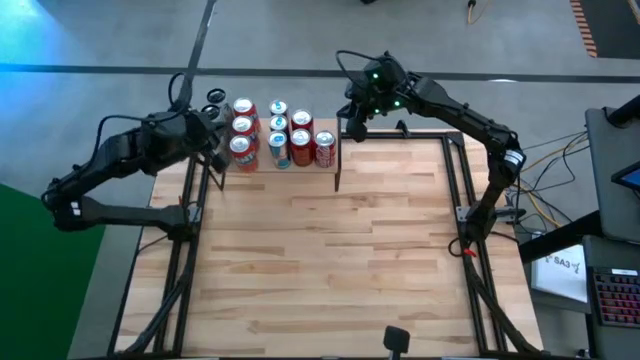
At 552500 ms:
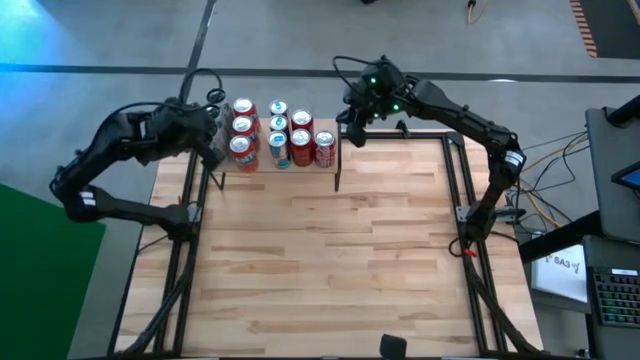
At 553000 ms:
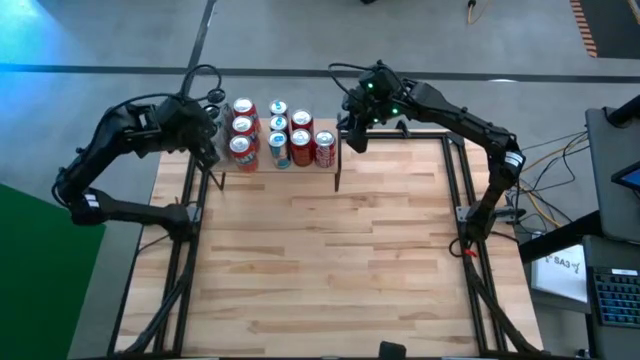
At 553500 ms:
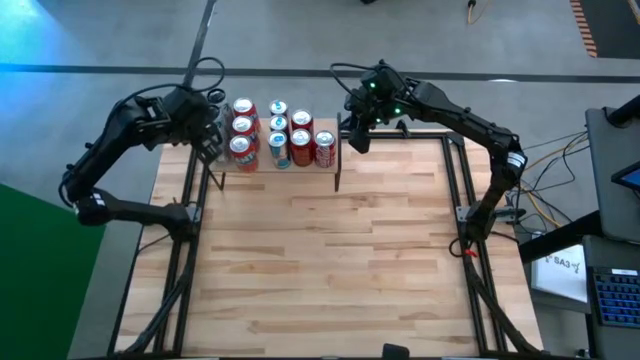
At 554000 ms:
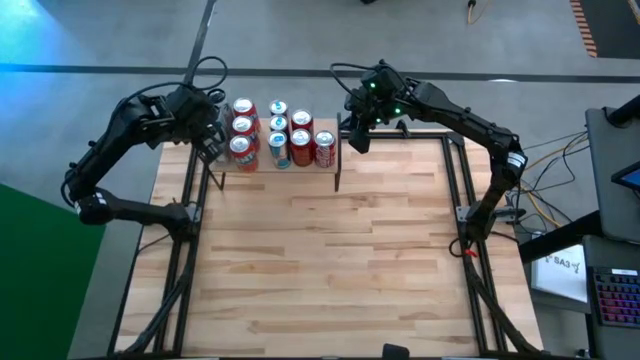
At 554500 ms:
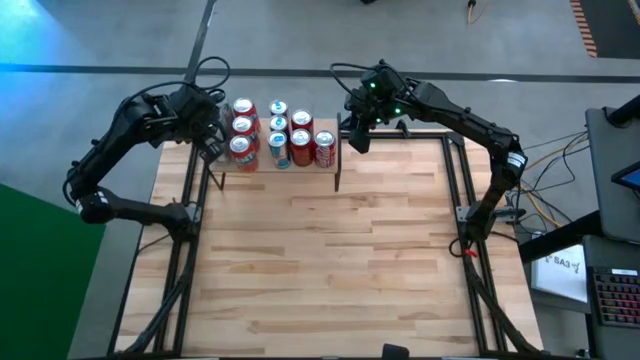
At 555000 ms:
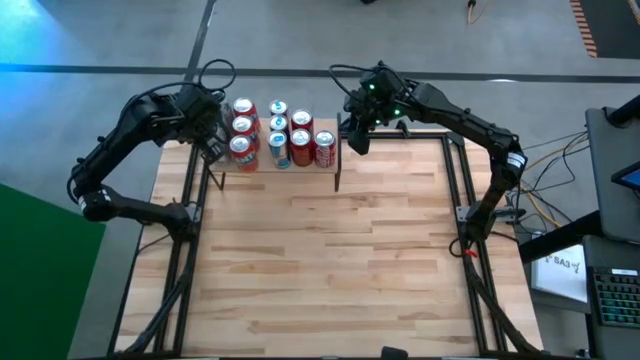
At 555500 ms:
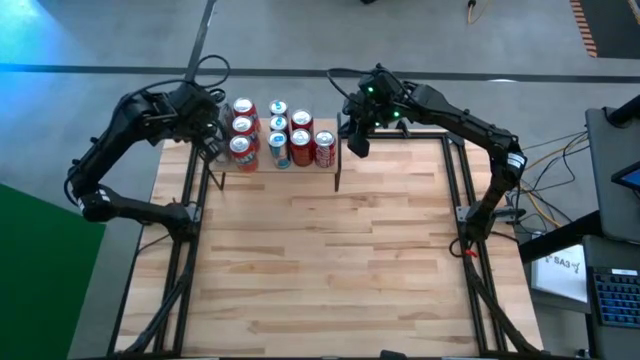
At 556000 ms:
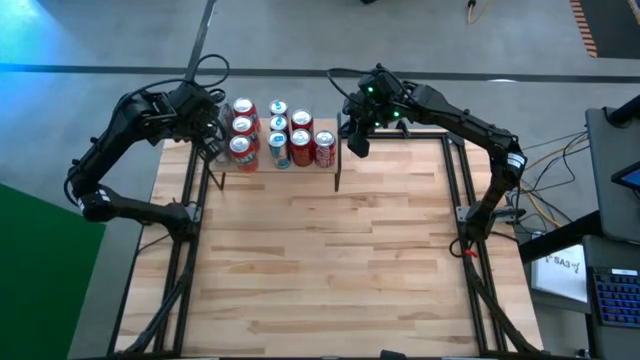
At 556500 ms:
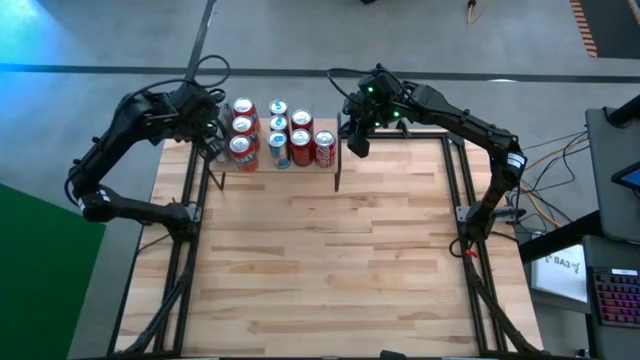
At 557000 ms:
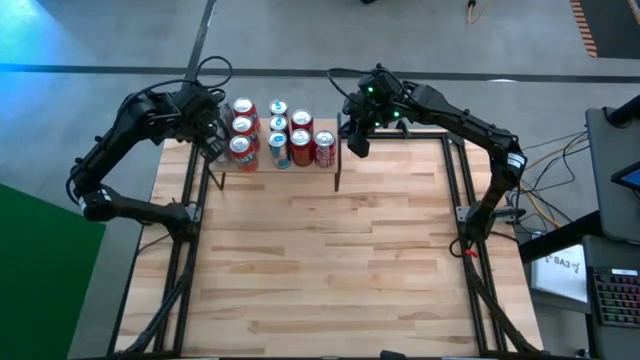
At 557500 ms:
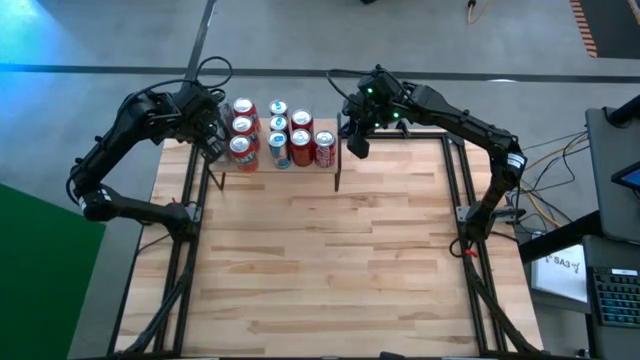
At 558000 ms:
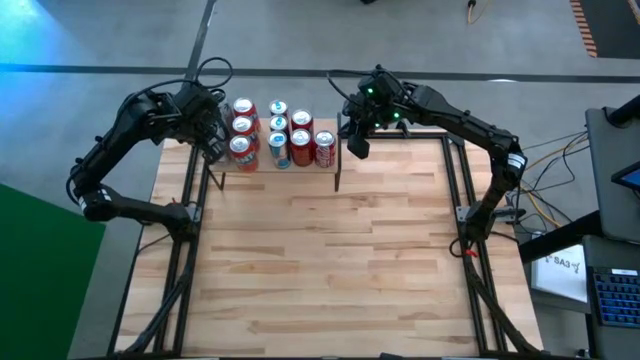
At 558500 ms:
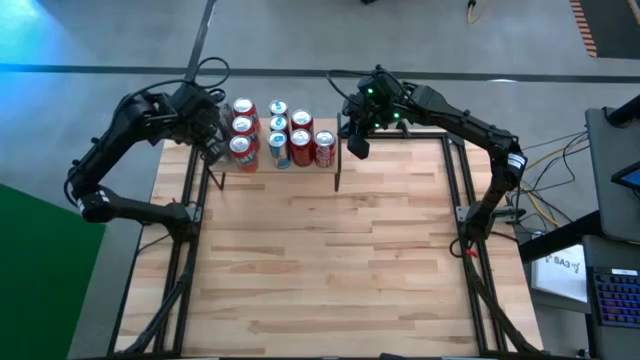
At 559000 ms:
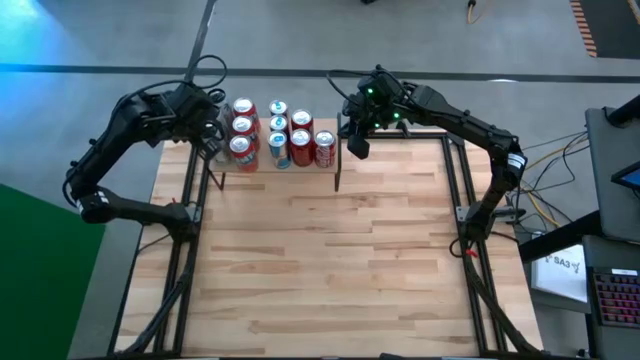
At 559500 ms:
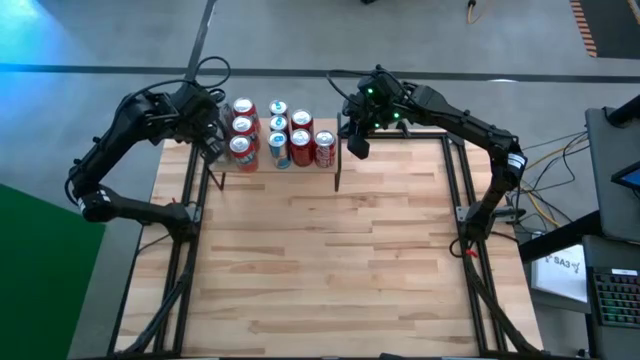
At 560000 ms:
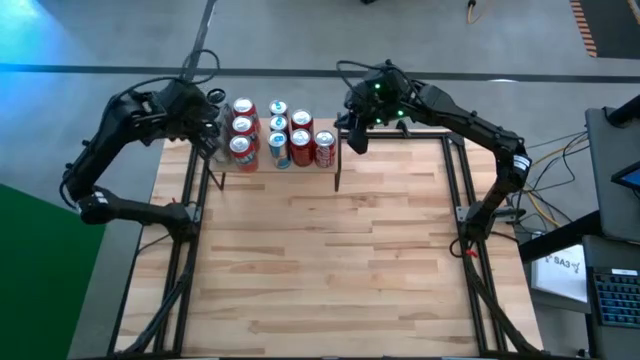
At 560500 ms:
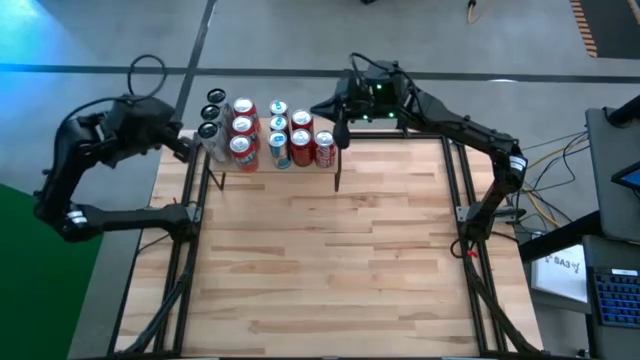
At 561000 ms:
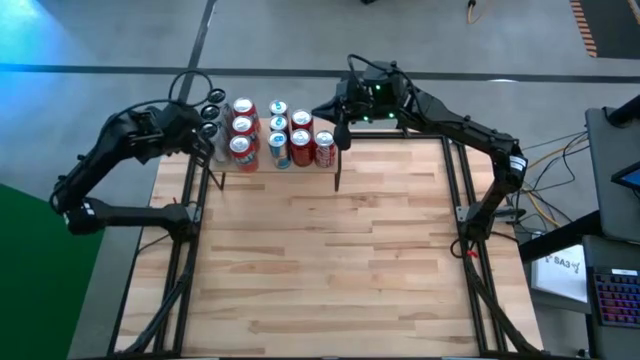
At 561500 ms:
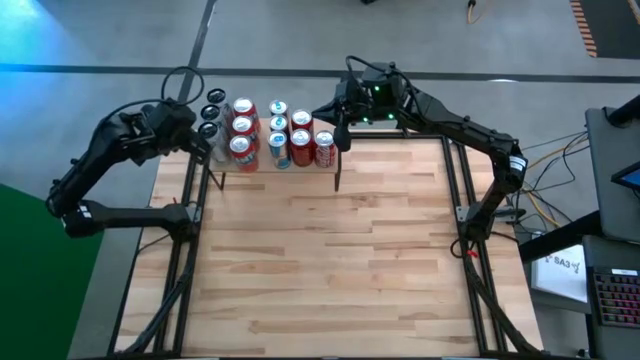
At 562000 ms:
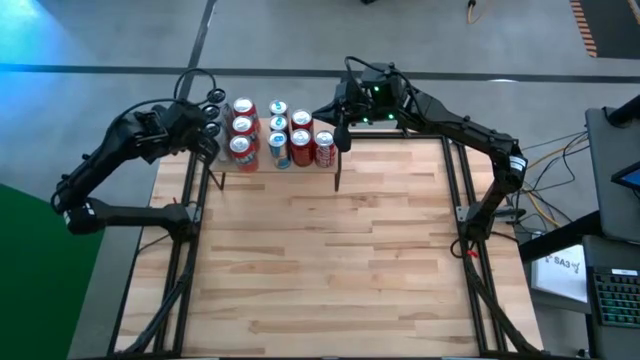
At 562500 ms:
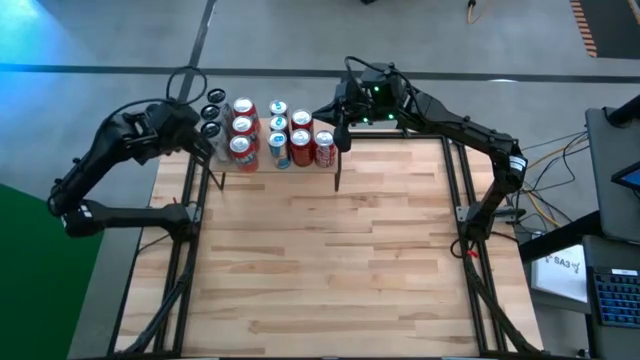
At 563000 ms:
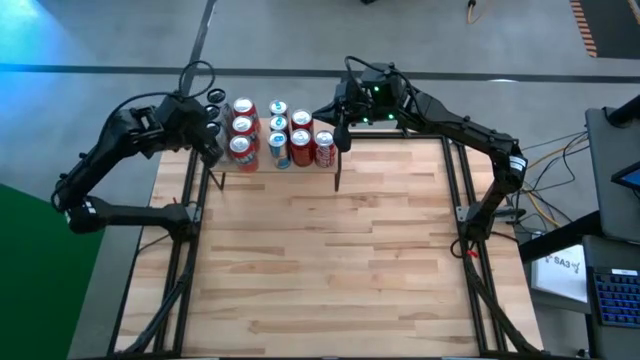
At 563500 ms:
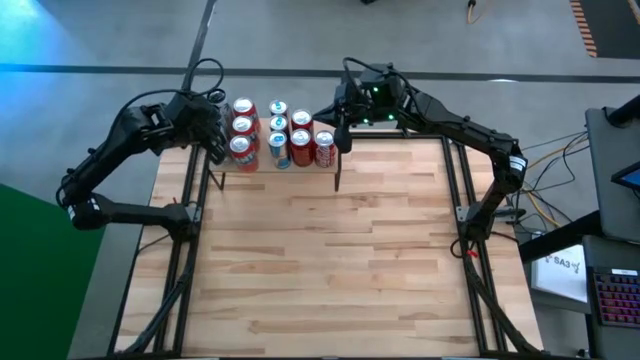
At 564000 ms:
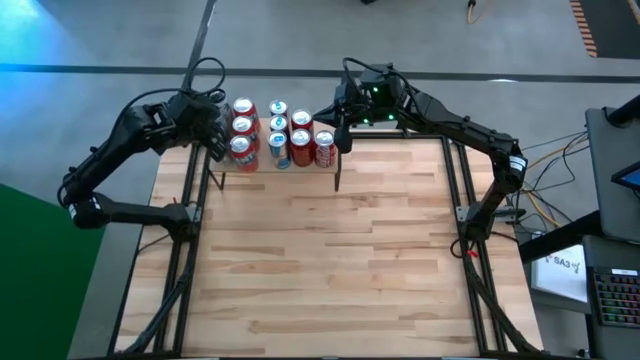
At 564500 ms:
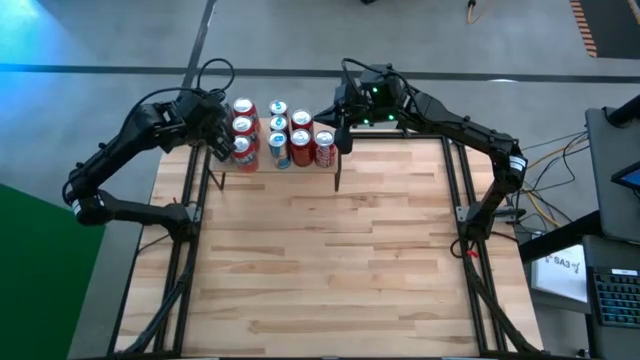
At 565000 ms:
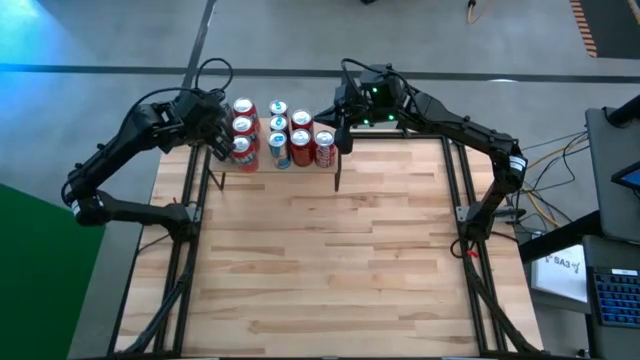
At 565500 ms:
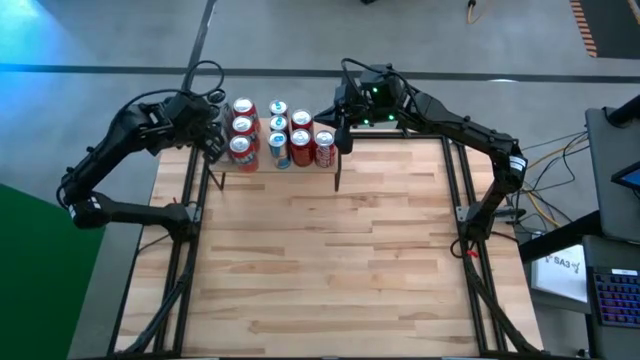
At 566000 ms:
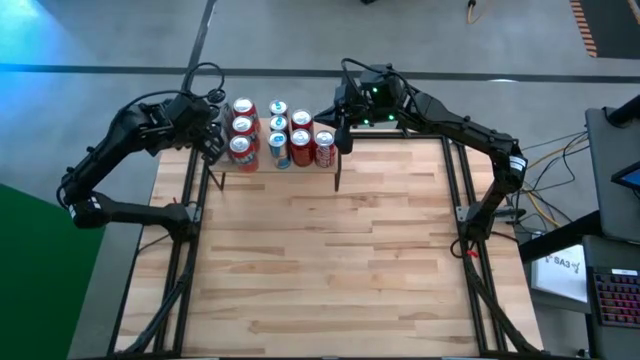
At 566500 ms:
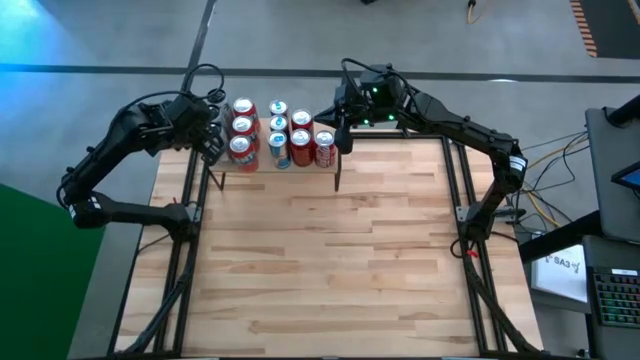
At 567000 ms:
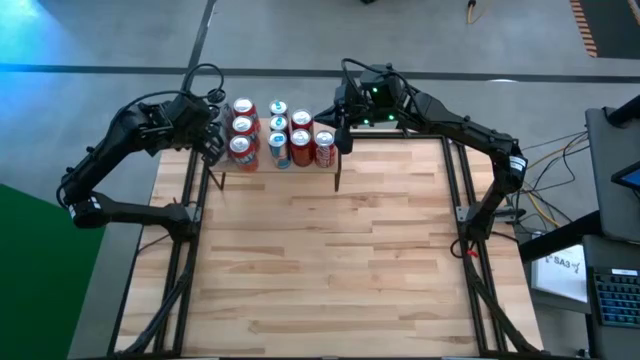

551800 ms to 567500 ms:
Task: Place canned beverage on shelf
Adjust the white pink soda can on the shelf

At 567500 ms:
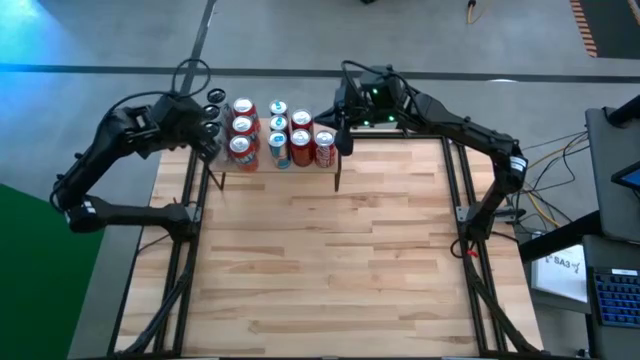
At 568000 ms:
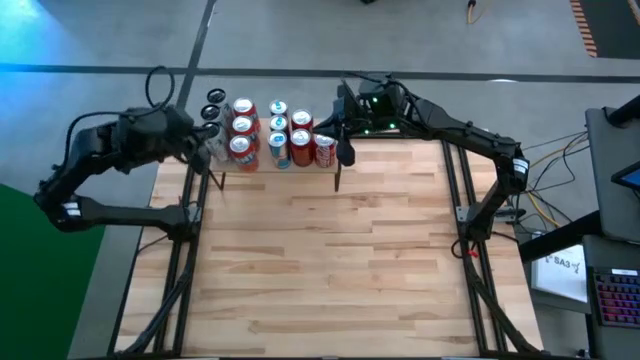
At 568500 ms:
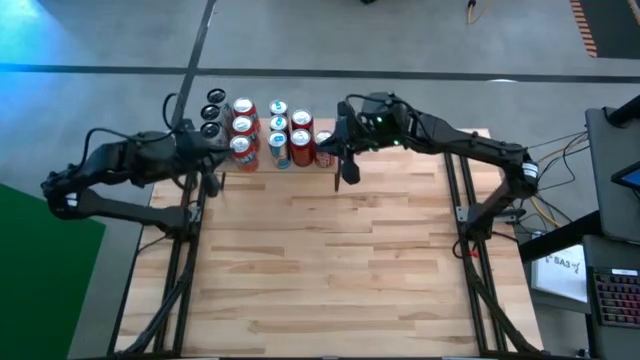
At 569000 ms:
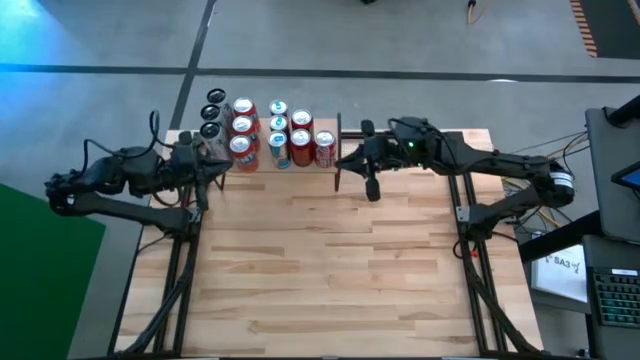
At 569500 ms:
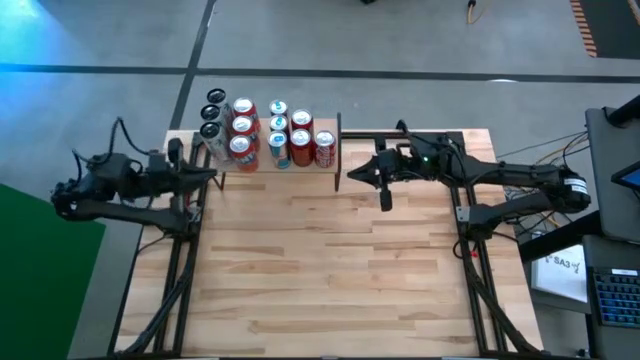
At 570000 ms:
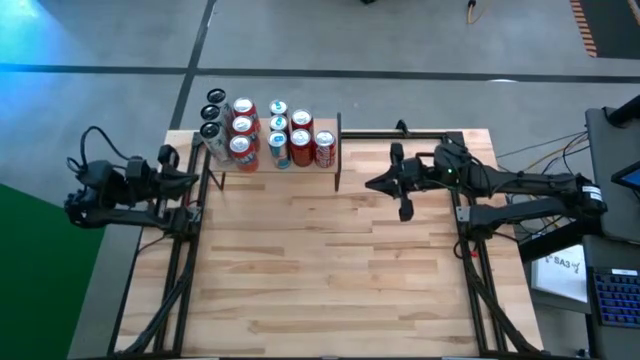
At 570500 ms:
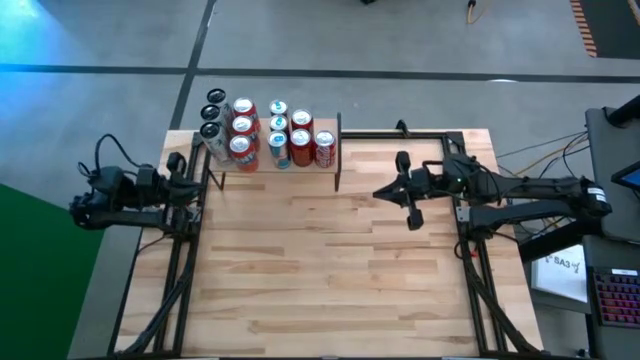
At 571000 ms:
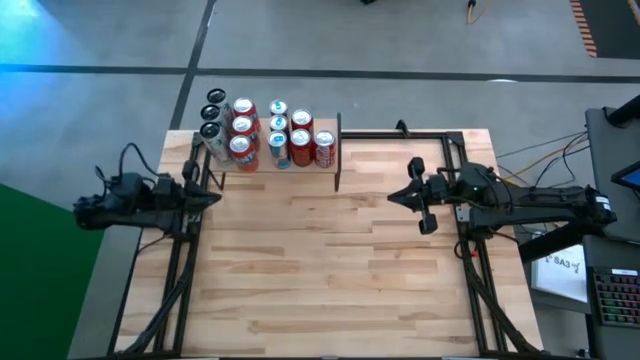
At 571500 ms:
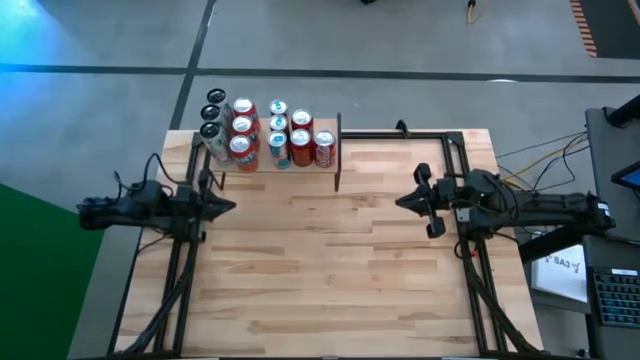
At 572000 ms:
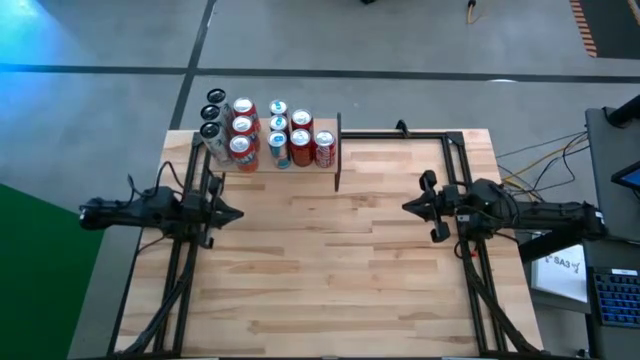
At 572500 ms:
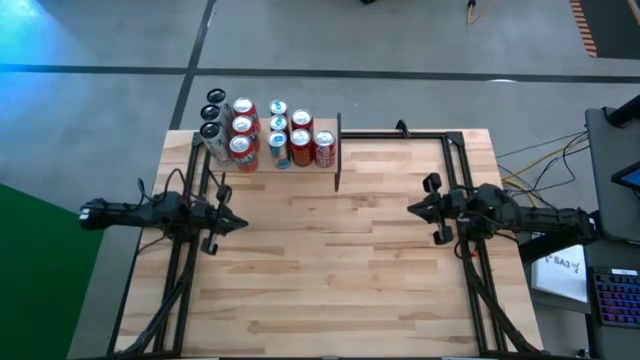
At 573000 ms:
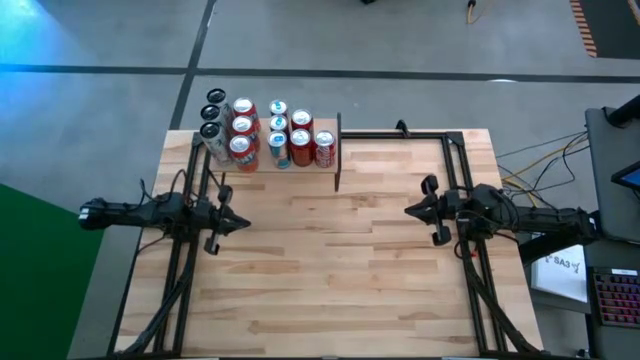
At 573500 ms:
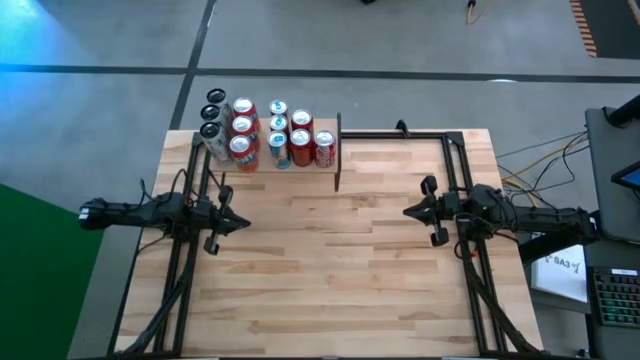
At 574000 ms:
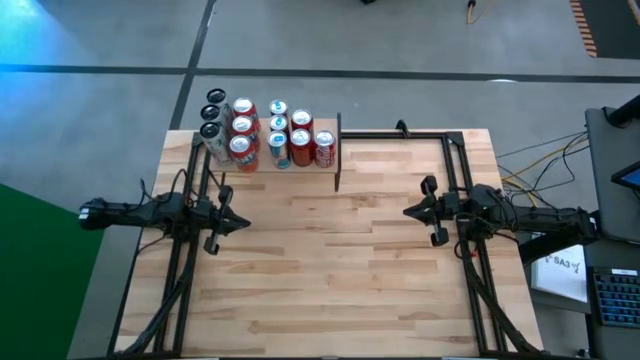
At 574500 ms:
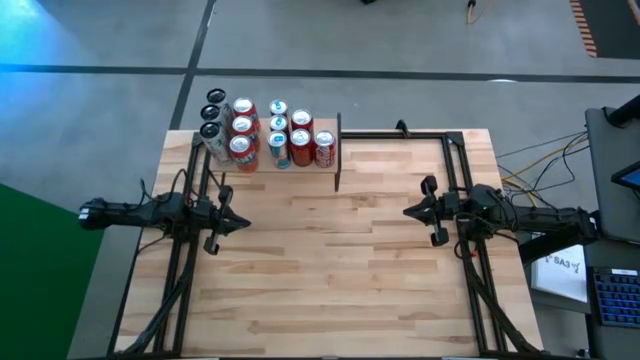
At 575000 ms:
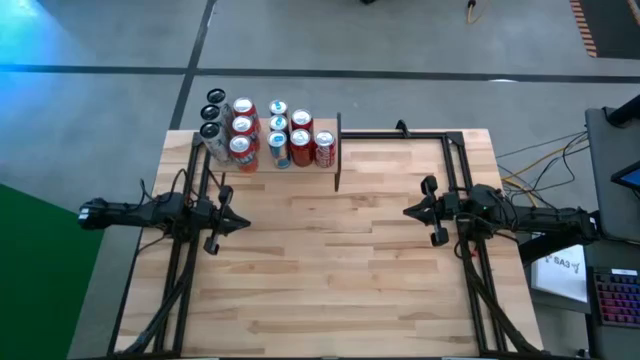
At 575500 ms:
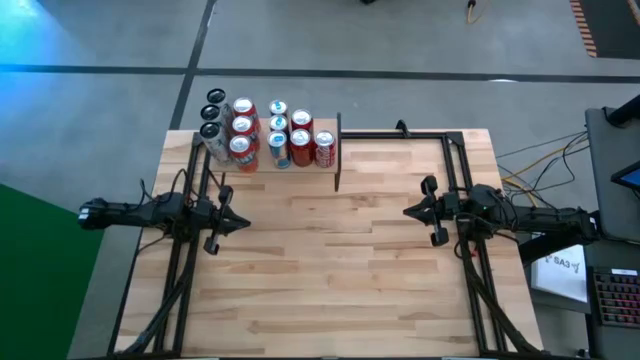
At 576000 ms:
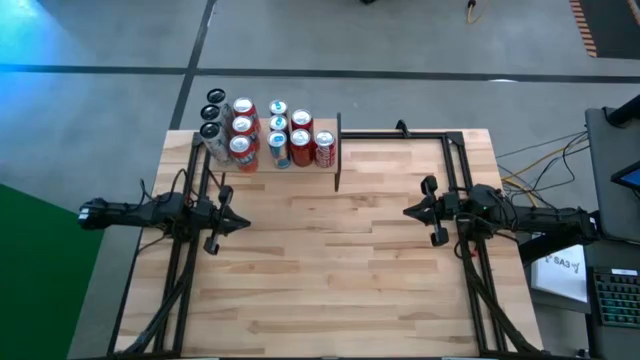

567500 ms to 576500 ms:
Return to Home Position
